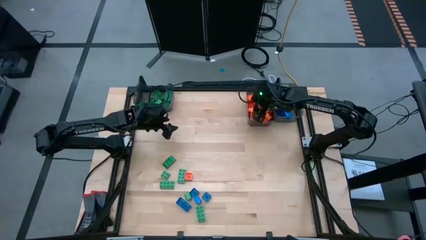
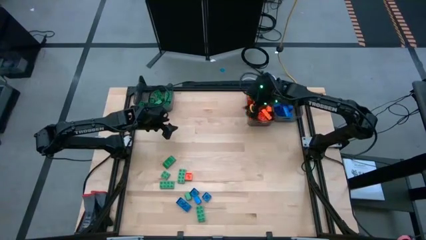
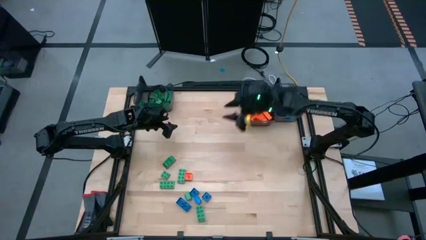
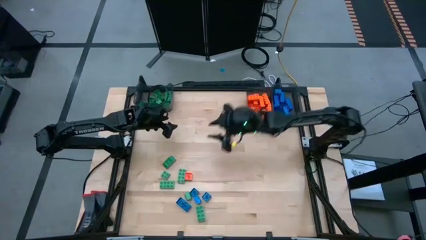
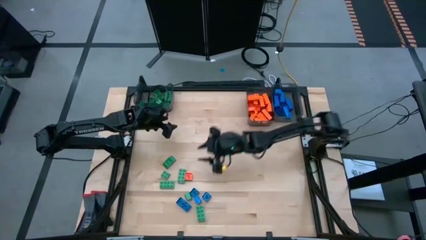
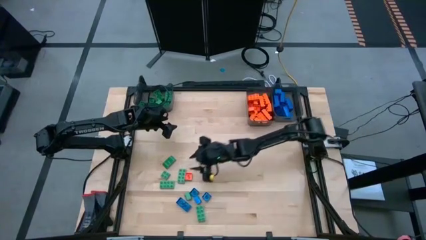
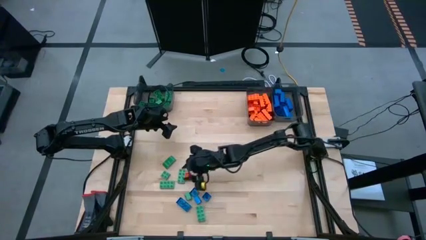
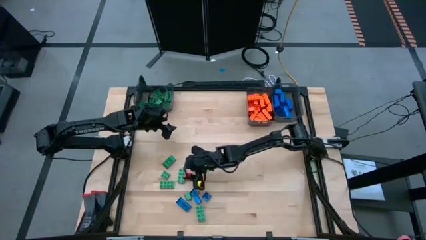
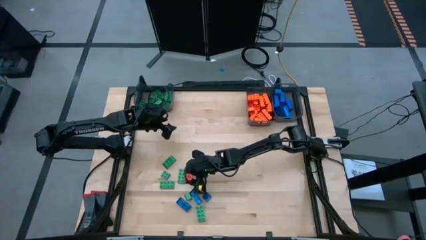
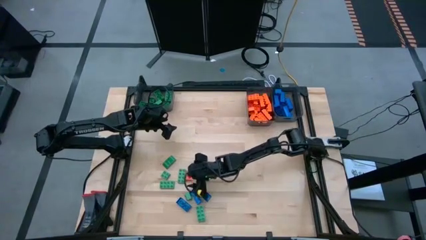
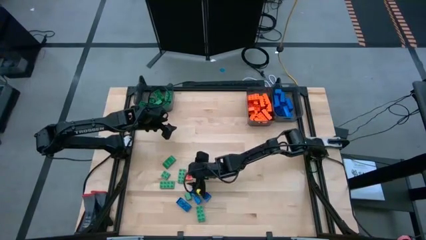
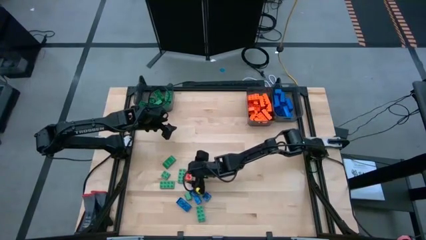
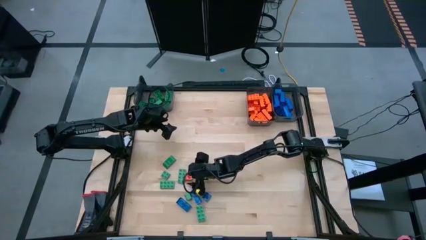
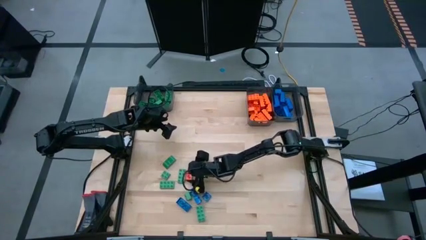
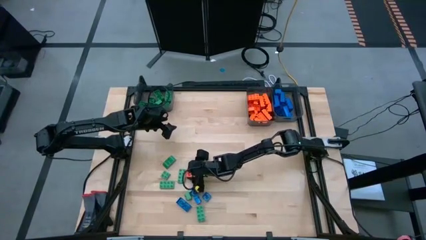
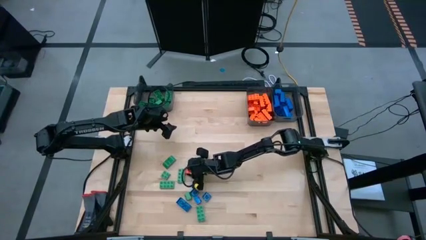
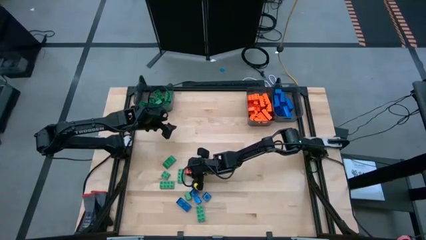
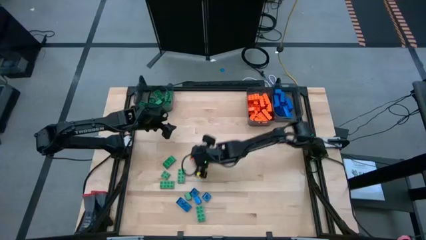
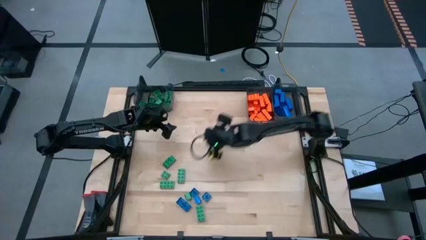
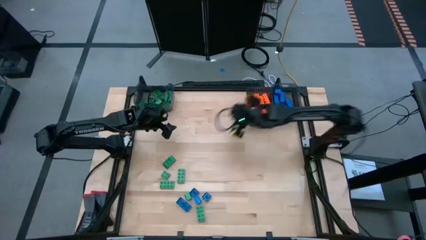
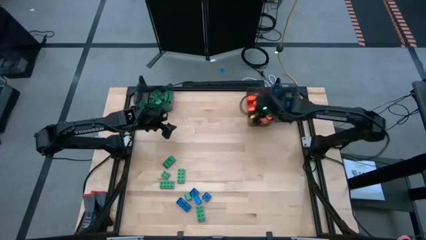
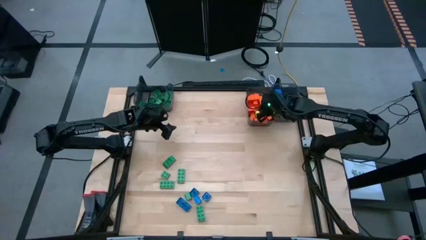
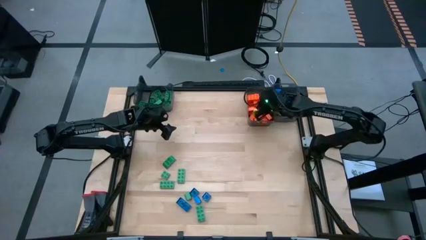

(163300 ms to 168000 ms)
Task: Sort blocks
Put the orange game piece into the middle black bin

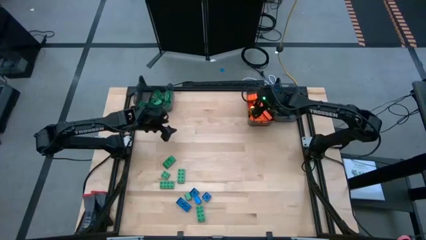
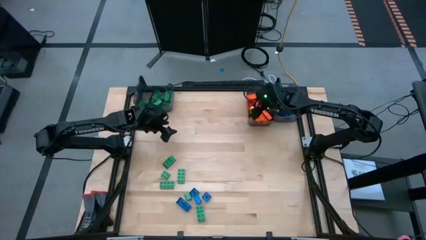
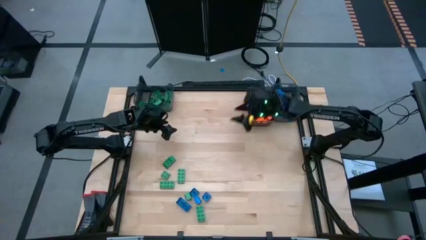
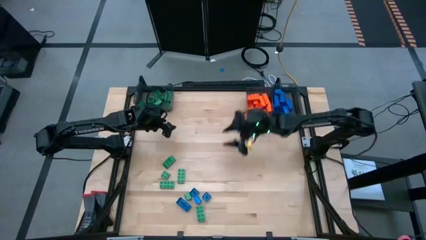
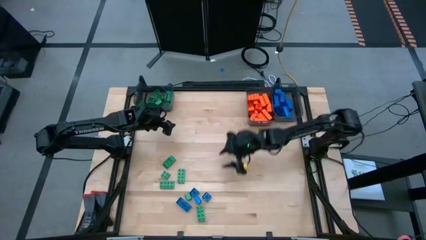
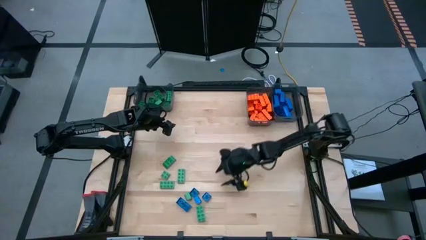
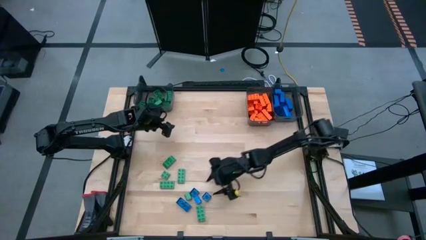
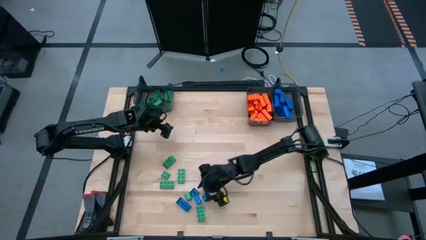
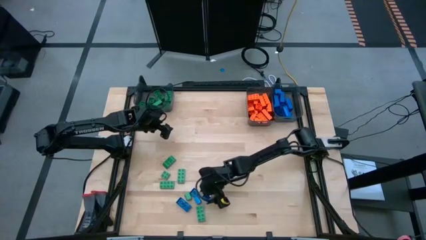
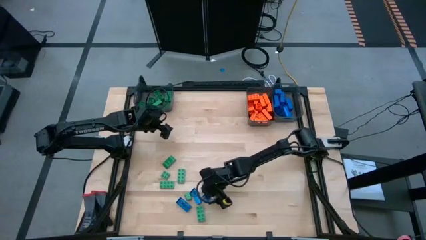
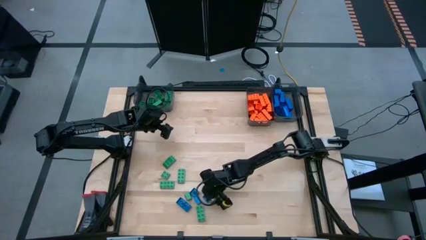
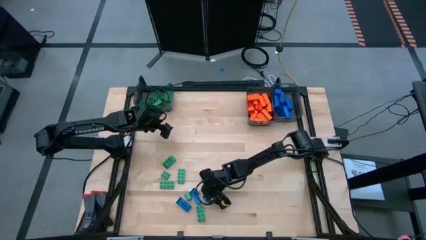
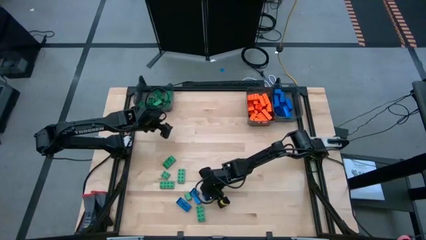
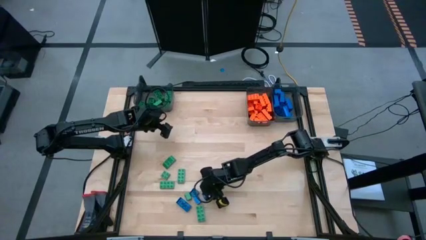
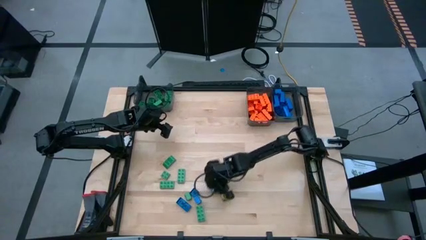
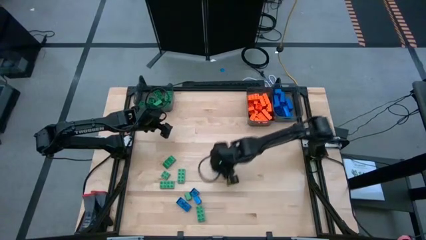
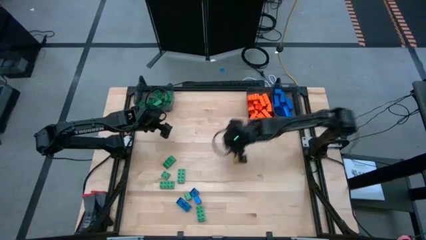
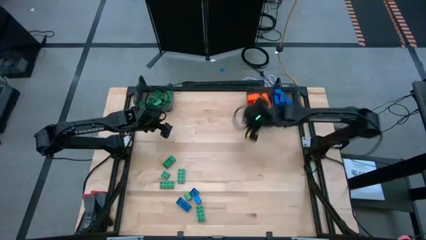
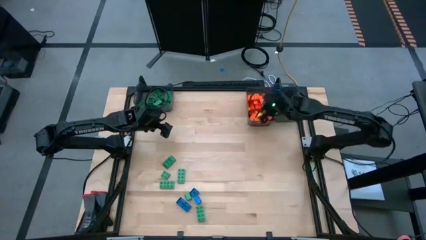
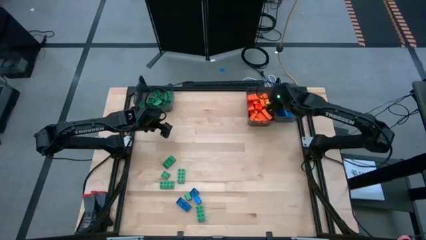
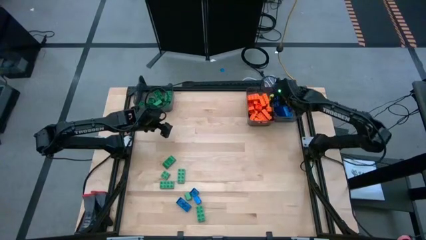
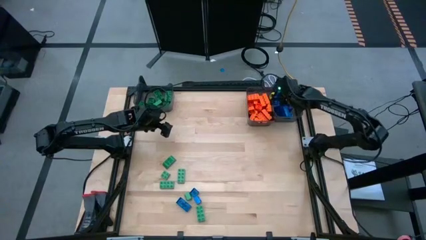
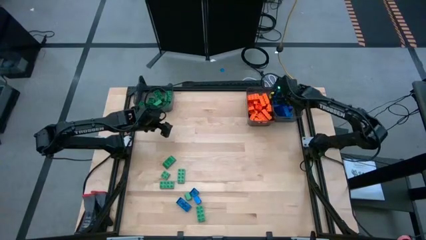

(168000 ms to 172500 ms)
Put the blue game piece into the right black bin

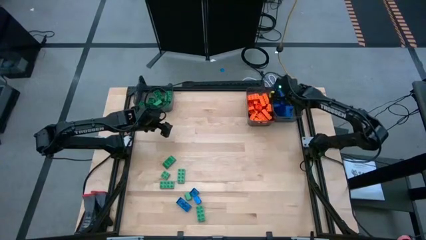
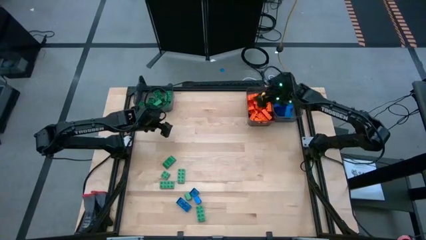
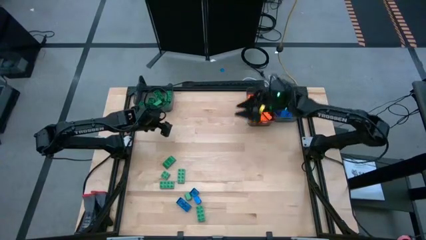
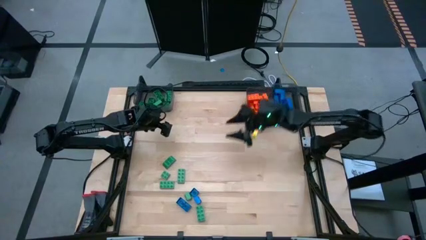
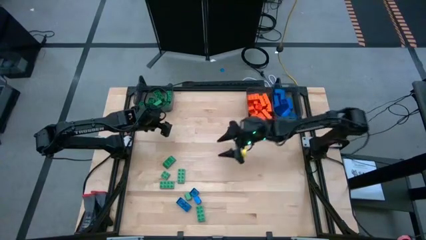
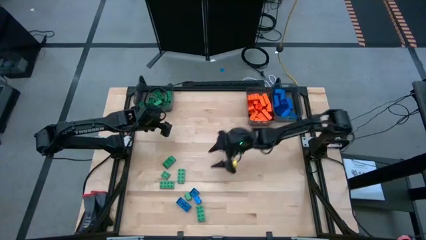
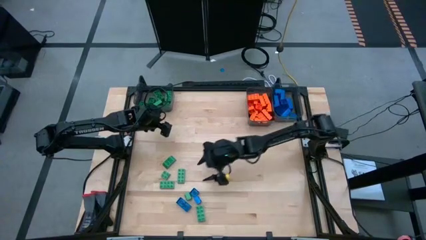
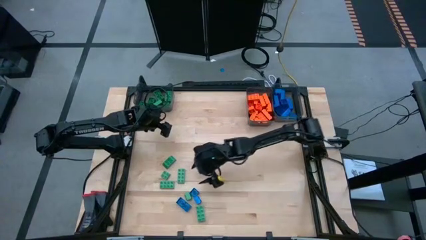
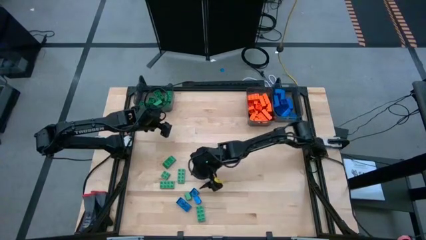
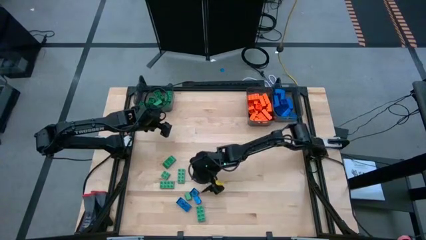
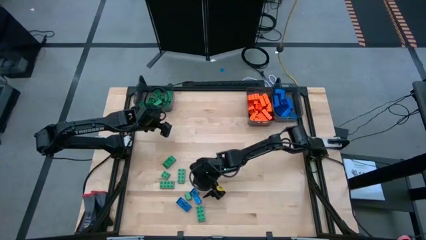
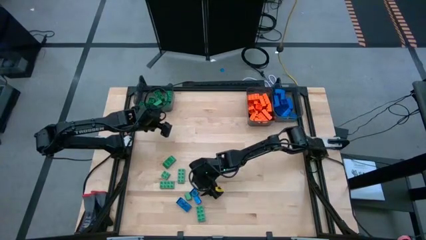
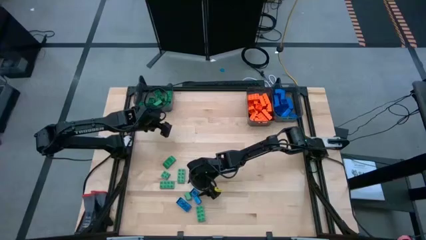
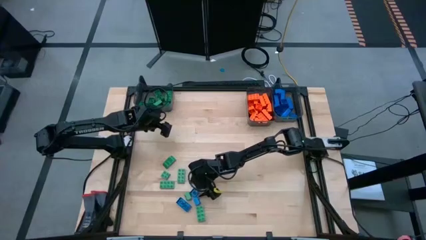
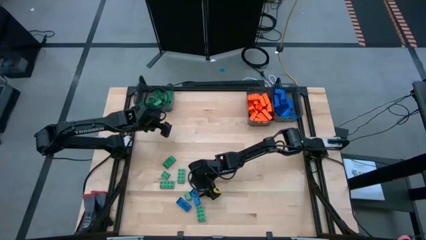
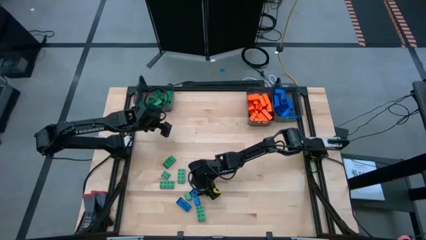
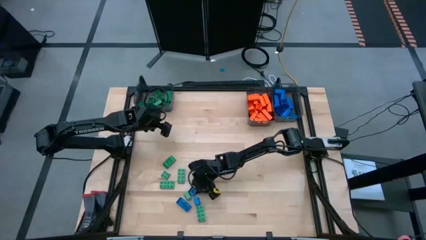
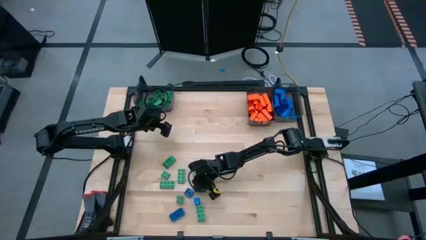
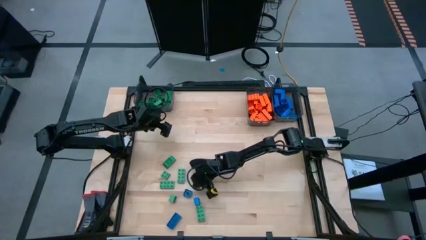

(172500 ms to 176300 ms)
Put the blue game piece into the right black bin

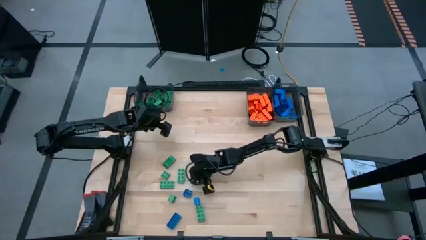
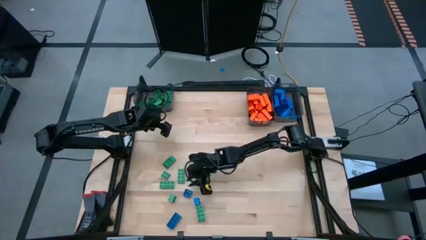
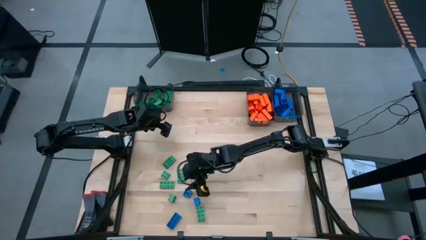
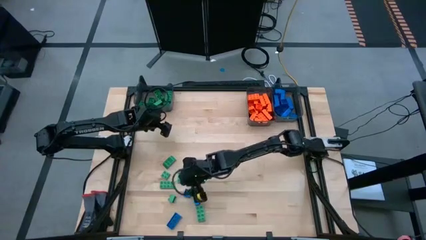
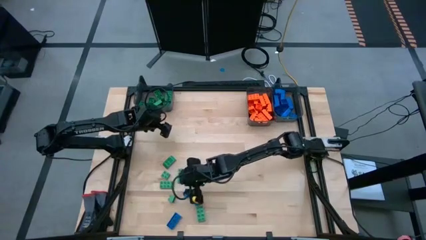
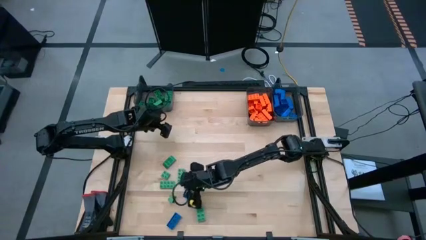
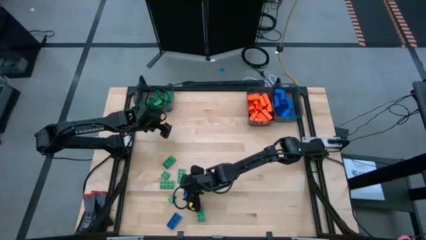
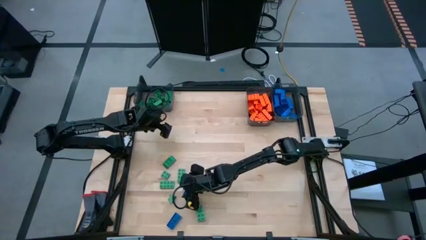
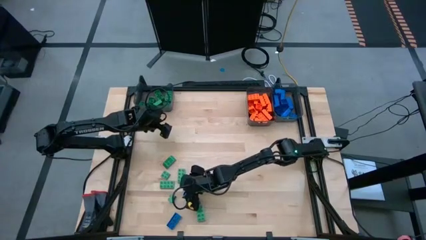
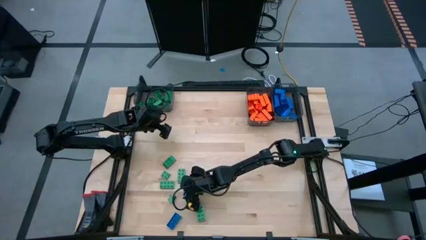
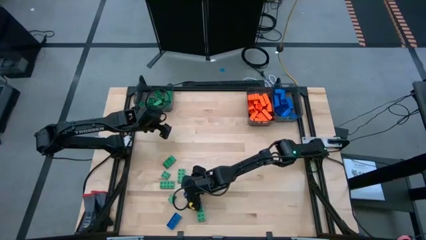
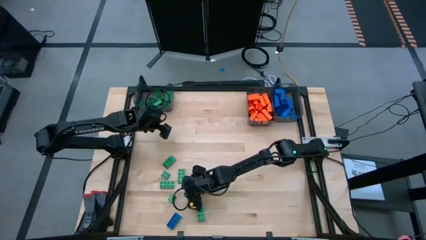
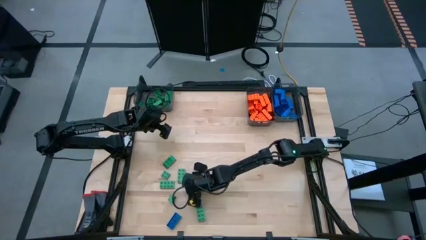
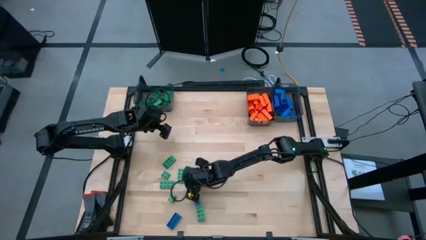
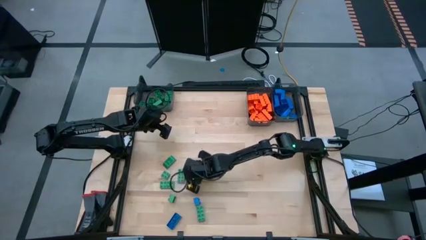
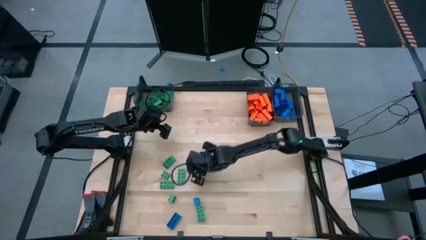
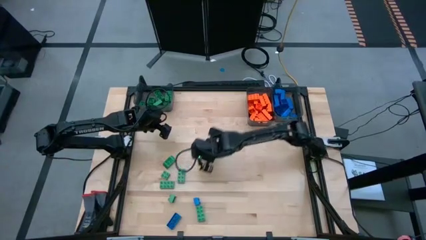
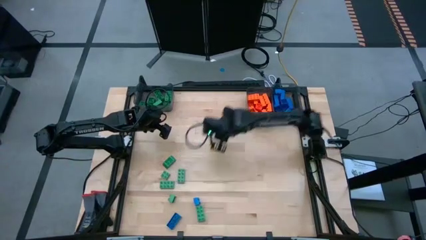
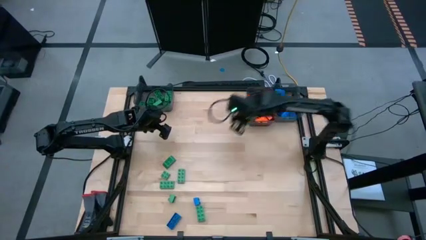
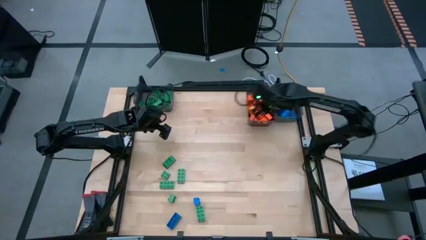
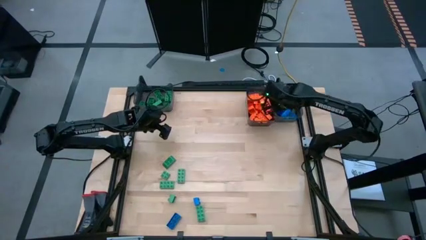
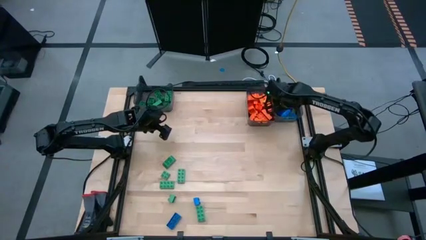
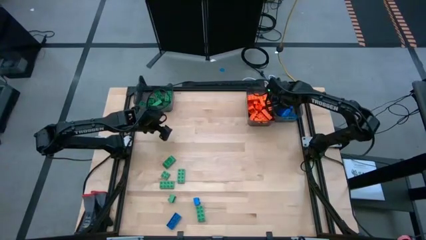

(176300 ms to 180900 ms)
Put the blue game piece into the right black bin
